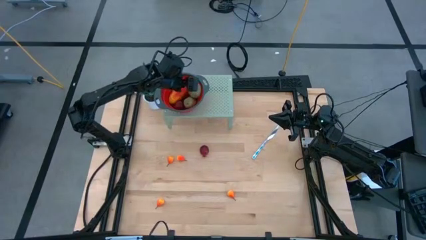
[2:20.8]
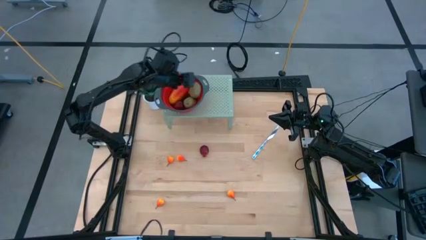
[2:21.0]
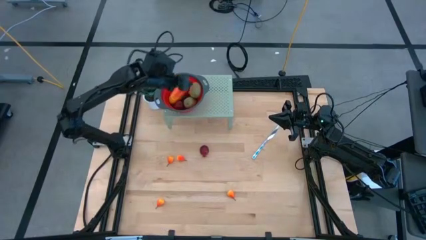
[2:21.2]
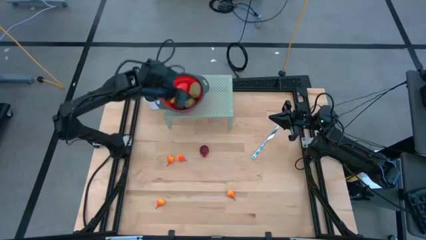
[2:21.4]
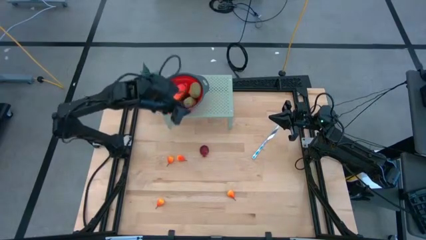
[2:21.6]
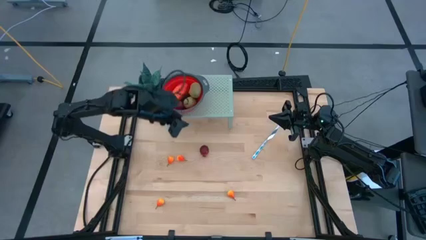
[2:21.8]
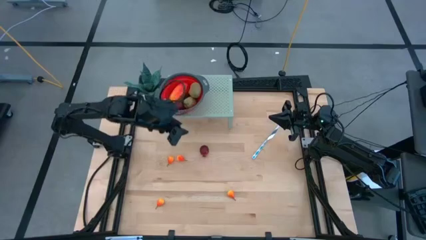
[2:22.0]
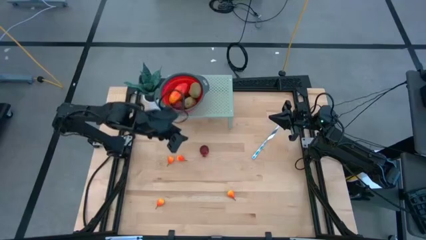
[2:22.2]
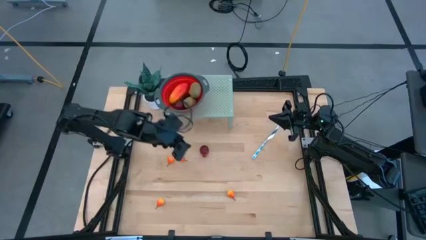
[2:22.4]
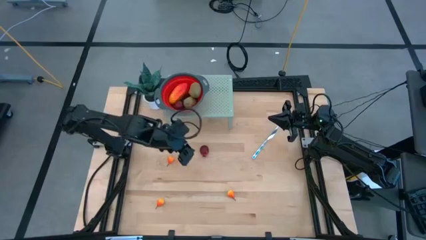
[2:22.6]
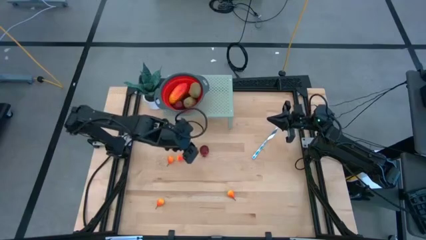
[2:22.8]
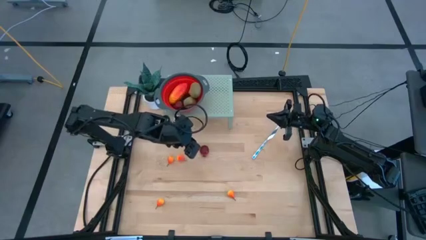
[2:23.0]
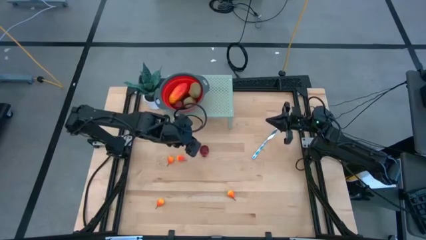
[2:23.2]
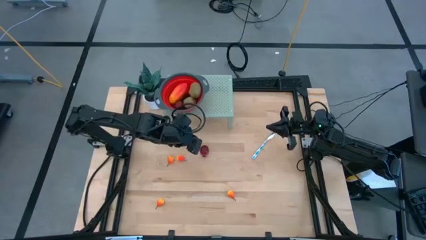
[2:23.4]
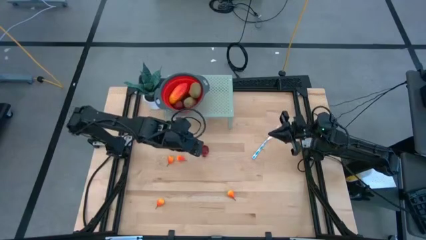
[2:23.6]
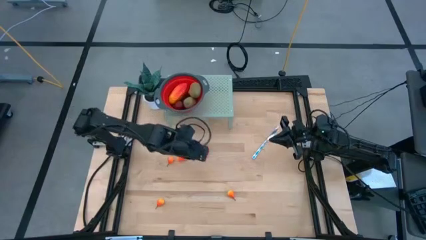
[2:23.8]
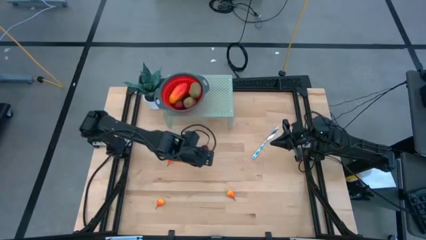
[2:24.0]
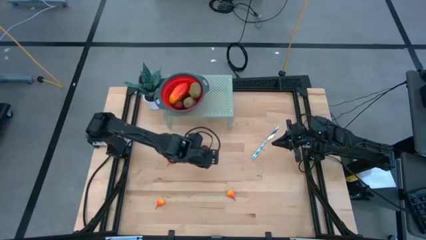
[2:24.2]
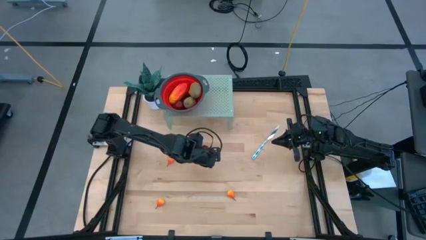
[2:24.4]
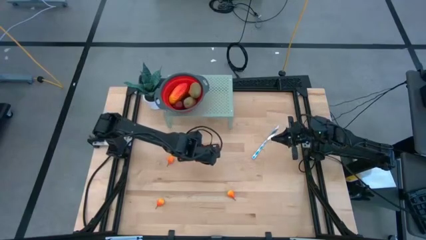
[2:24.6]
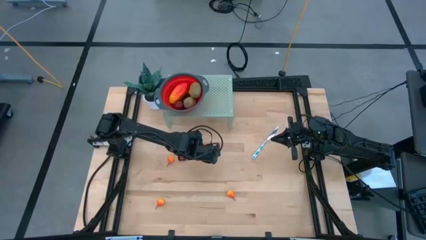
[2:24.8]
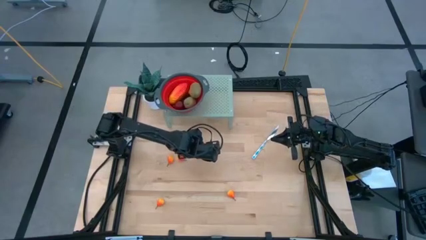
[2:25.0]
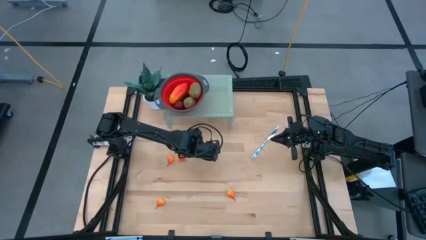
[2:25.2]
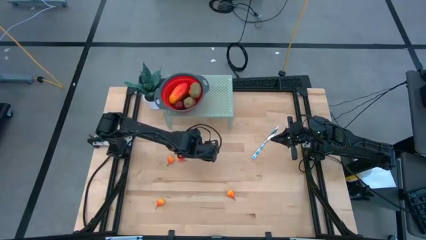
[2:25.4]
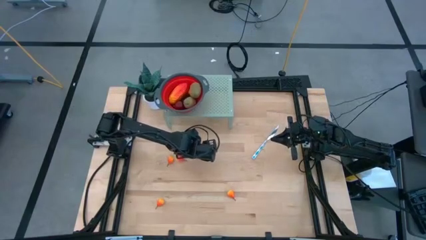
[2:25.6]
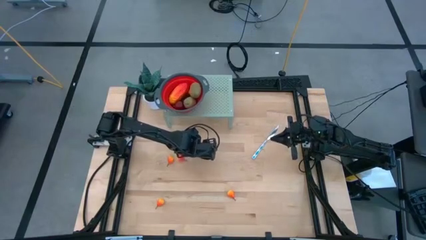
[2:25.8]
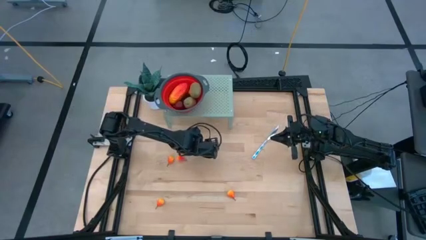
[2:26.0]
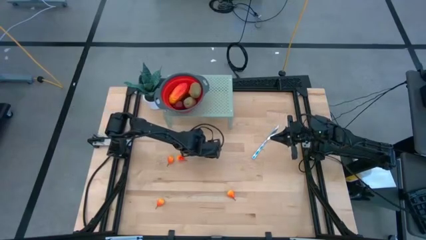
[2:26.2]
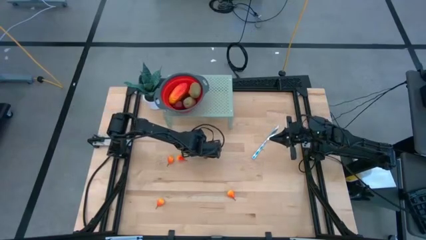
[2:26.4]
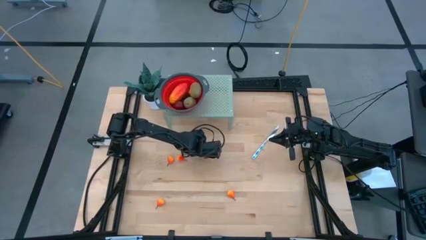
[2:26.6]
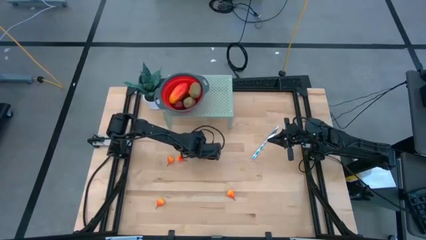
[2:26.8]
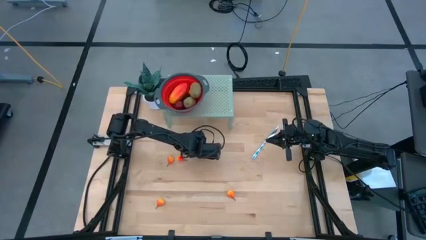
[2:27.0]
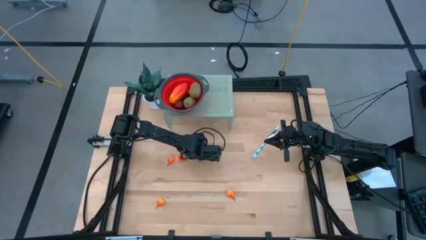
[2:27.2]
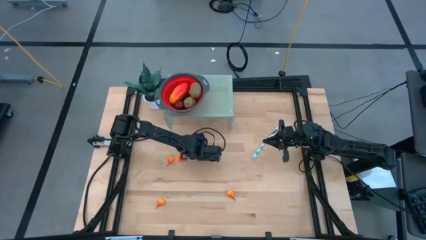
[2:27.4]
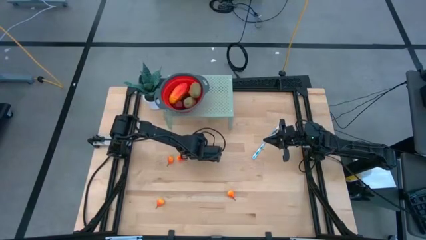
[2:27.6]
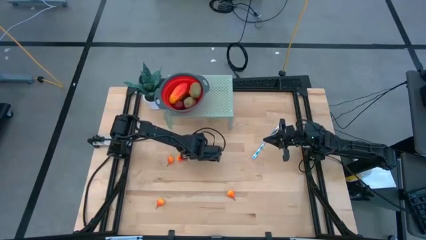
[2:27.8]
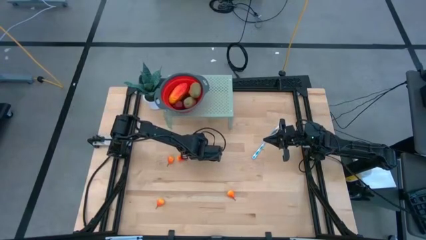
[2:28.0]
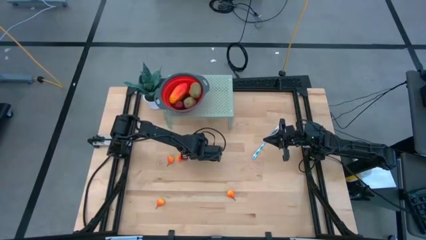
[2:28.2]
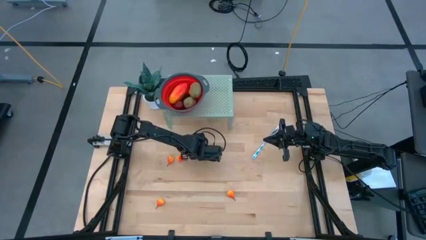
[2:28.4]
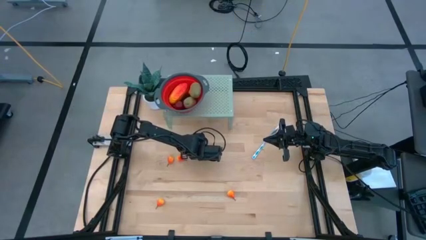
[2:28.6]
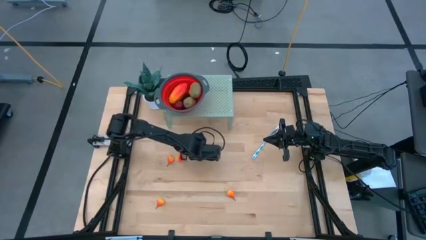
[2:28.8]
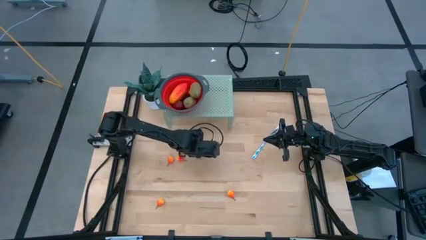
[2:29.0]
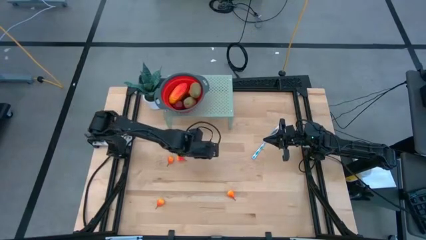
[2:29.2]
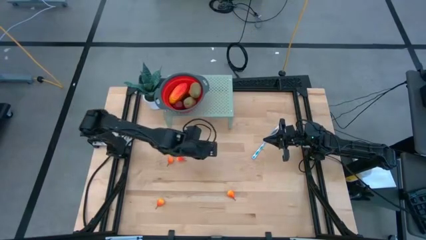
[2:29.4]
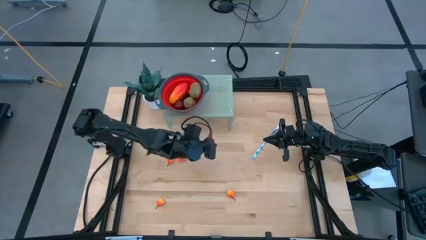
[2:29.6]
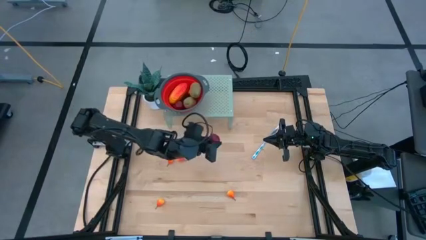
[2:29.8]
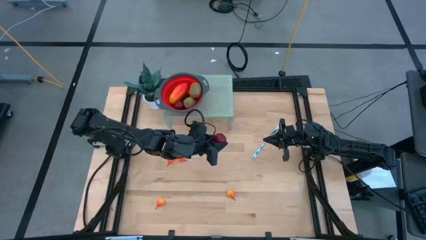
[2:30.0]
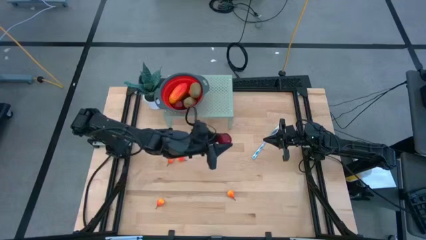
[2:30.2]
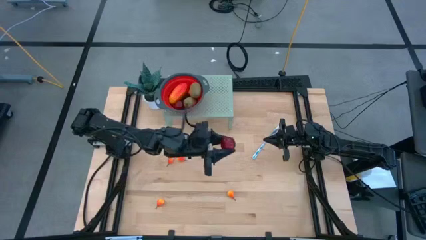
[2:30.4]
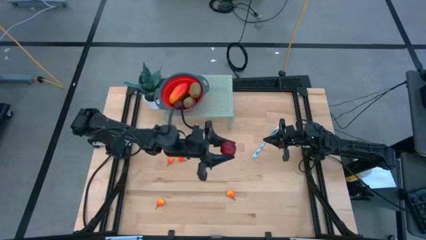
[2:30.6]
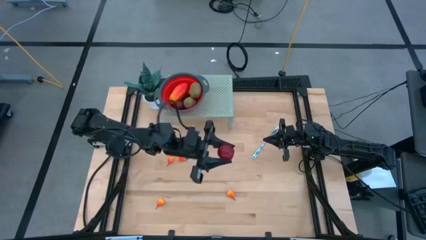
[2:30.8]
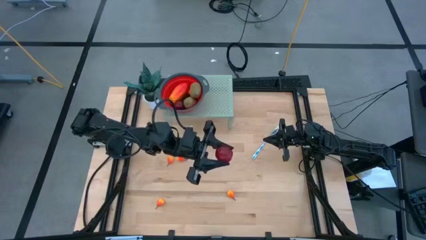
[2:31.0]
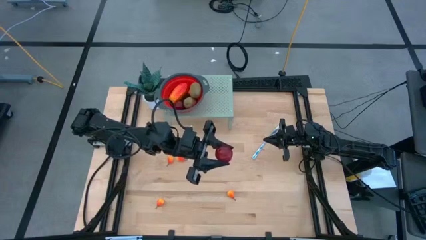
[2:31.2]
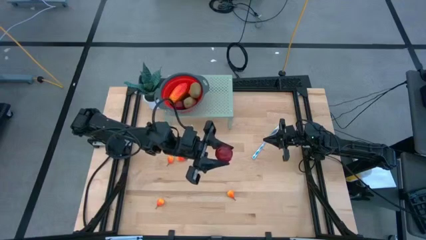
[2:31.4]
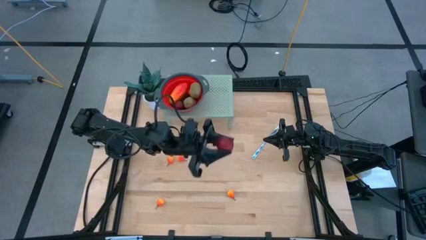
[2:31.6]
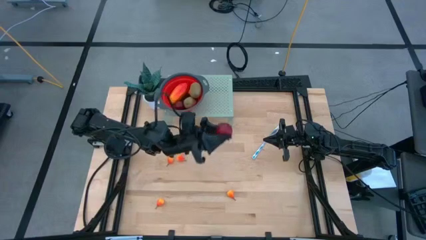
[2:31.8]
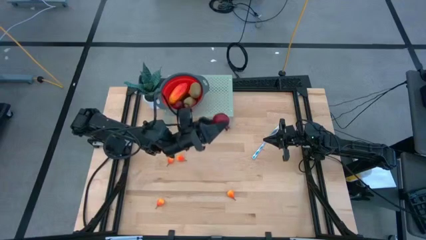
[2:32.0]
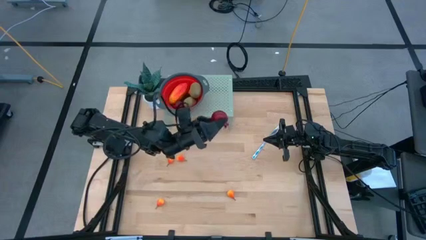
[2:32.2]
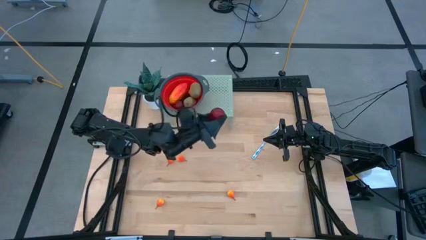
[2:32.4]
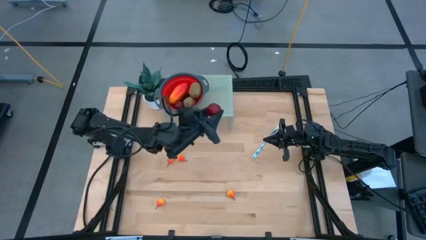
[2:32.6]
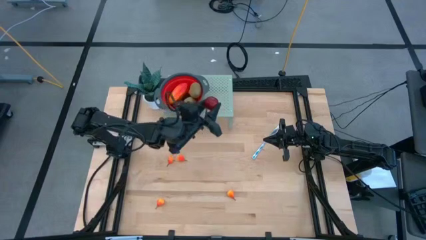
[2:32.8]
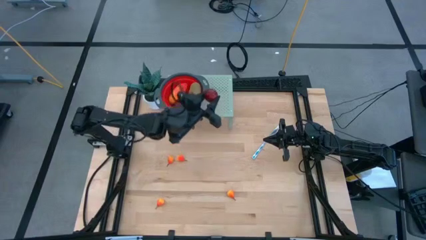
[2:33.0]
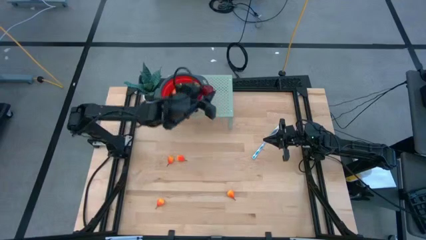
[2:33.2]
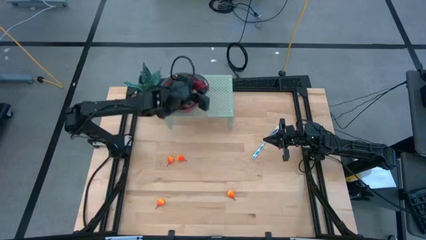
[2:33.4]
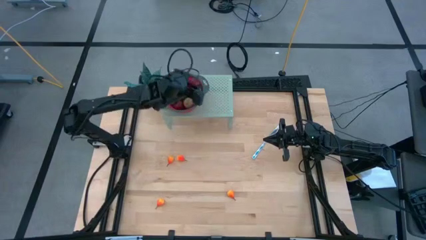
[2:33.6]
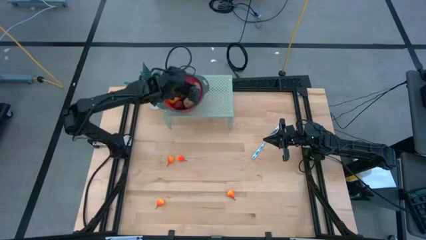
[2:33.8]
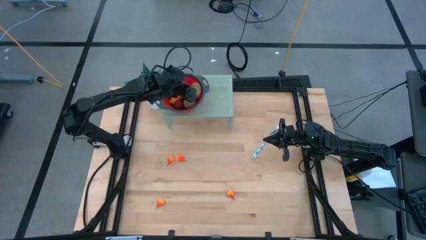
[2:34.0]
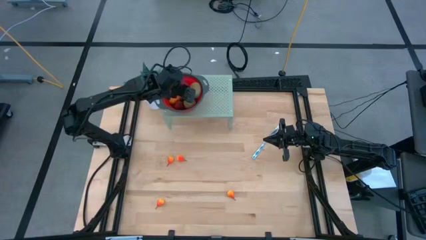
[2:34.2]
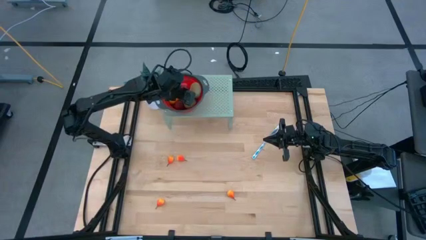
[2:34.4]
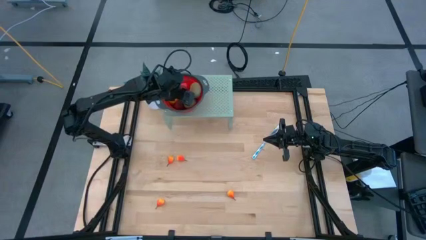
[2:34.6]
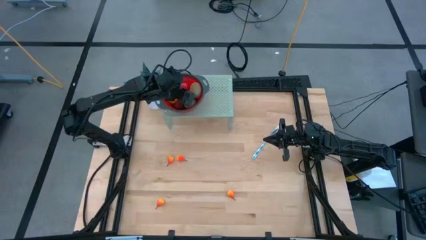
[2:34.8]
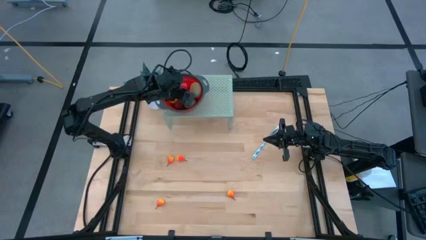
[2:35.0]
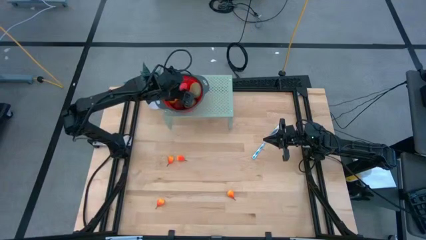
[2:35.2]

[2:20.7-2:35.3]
Task: Pick & Place Fruit
Put the pomegranate into the red strainer bowl on the shelf
